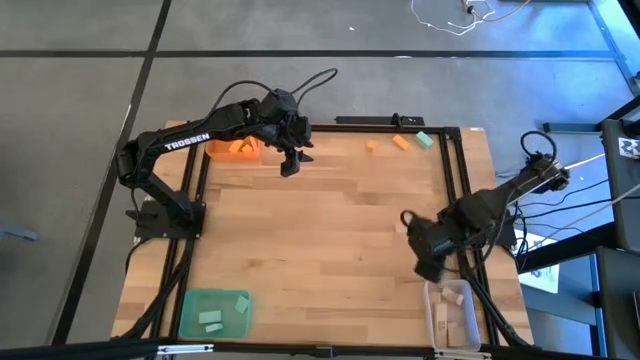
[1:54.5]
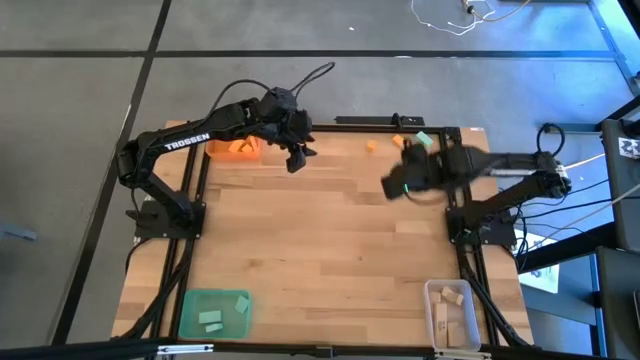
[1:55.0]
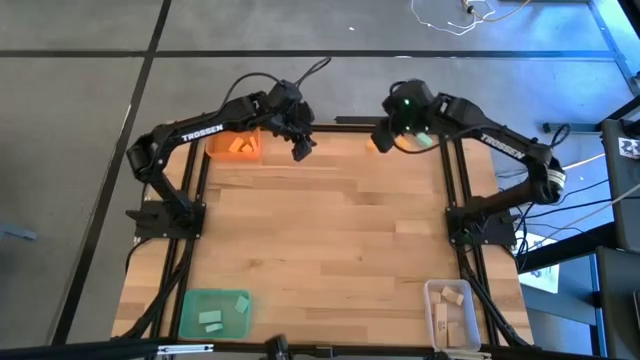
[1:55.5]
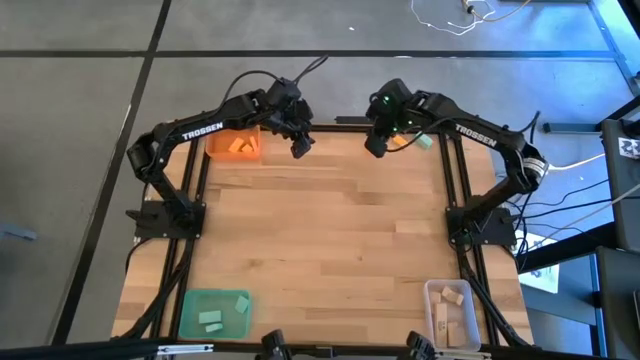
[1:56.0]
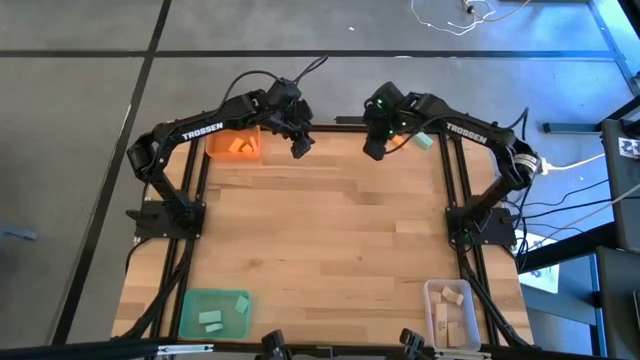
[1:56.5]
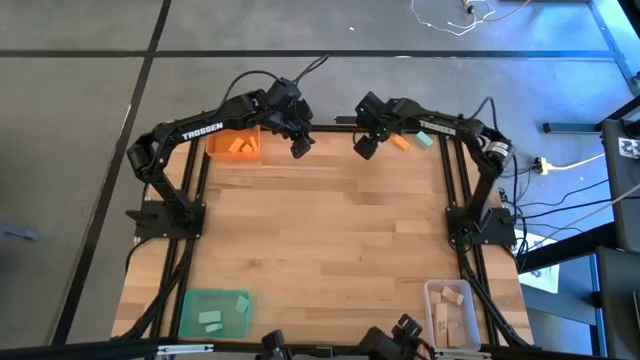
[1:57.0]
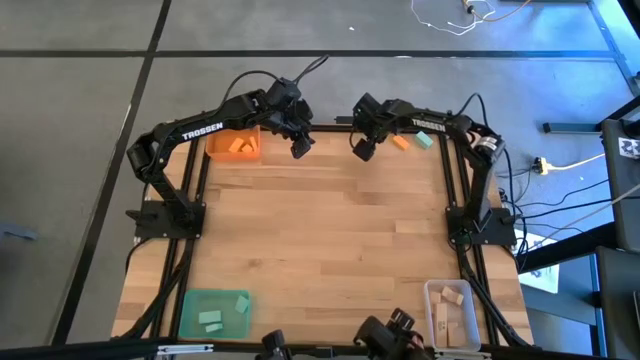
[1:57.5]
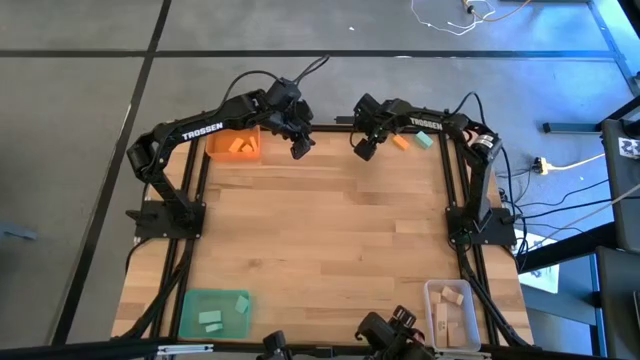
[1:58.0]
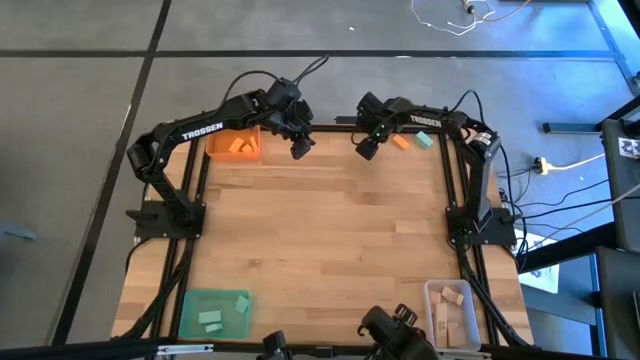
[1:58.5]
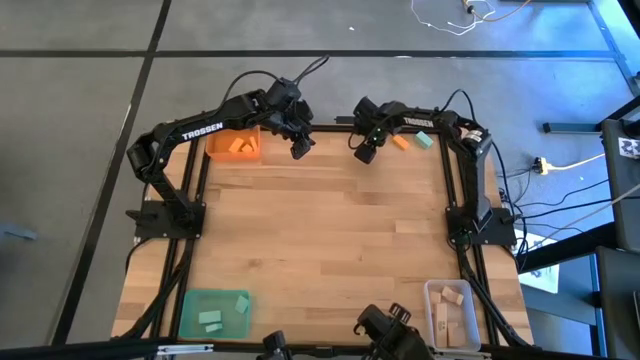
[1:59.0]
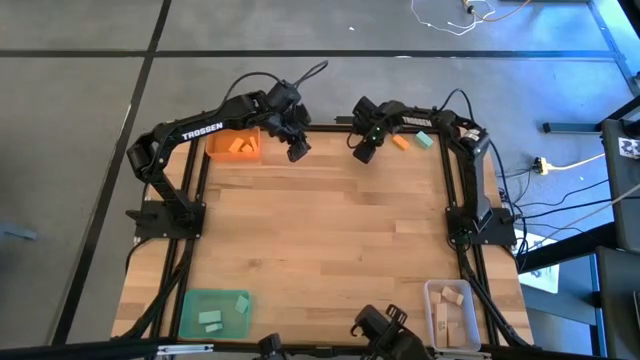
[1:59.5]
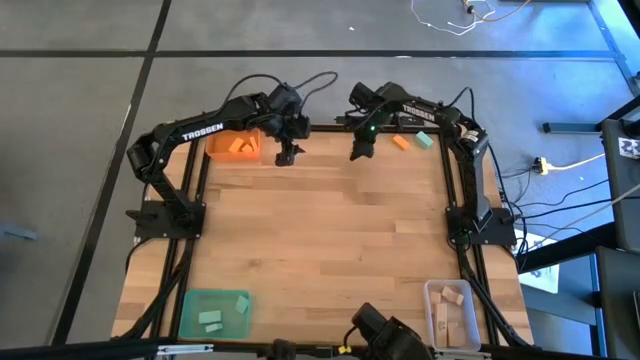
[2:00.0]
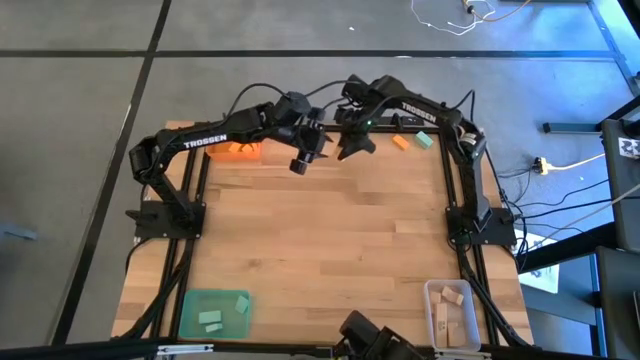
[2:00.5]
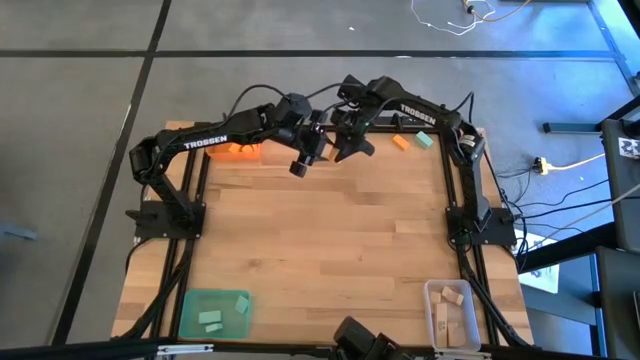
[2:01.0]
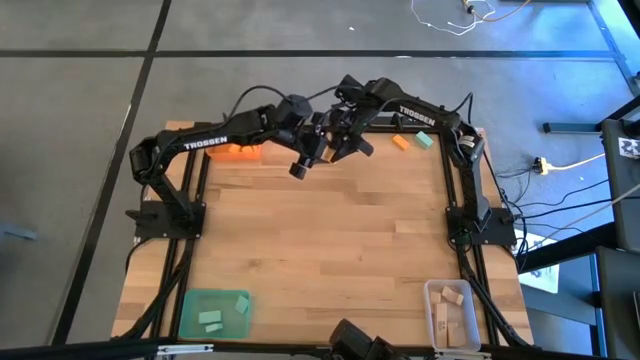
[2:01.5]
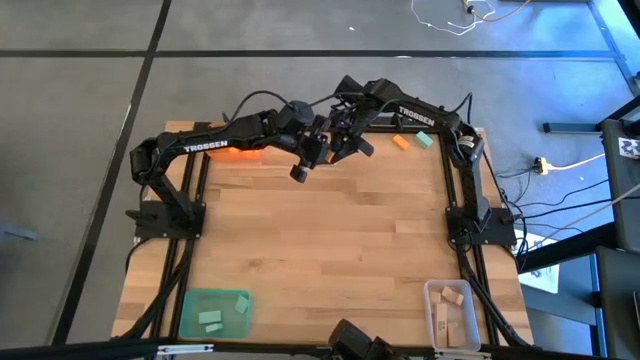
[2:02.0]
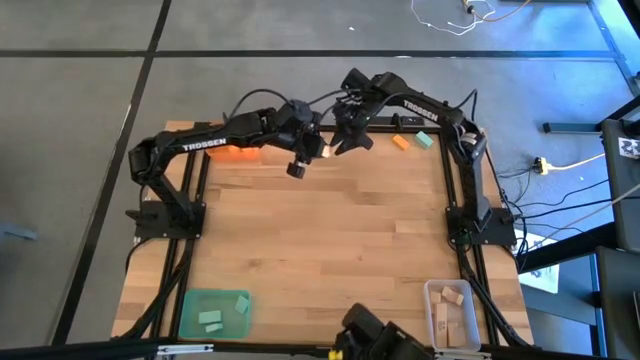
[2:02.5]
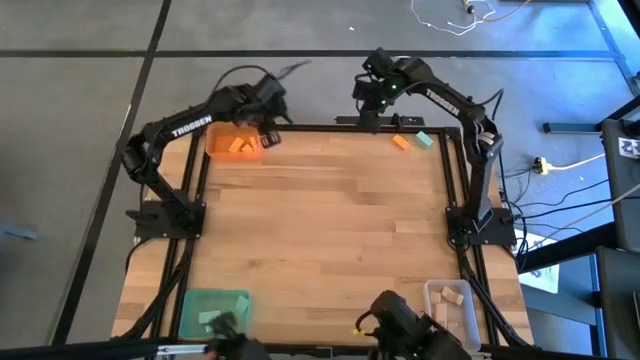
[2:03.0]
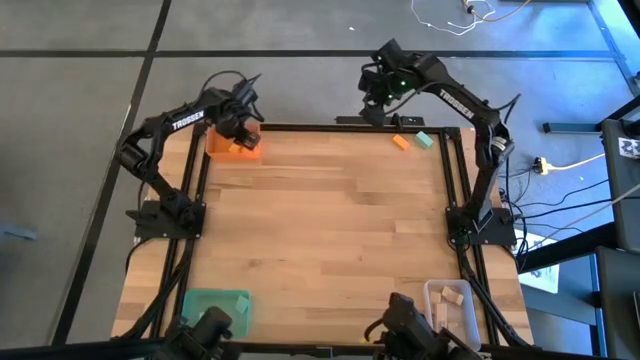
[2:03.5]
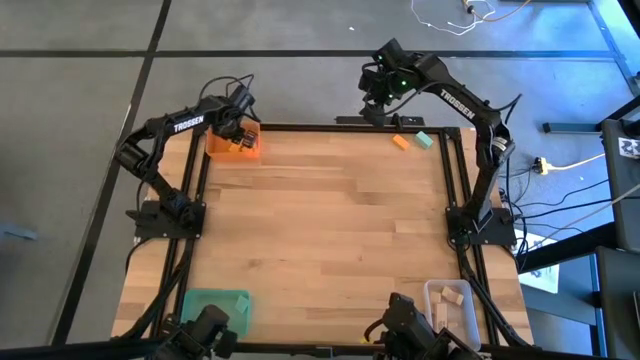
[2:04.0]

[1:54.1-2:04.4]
Task: Sort & place blocks by color
Put the orange block into the orange bin

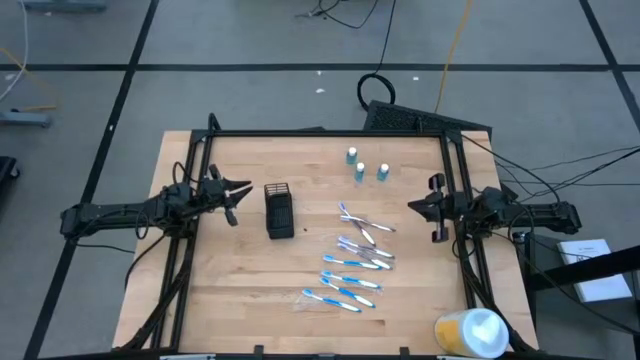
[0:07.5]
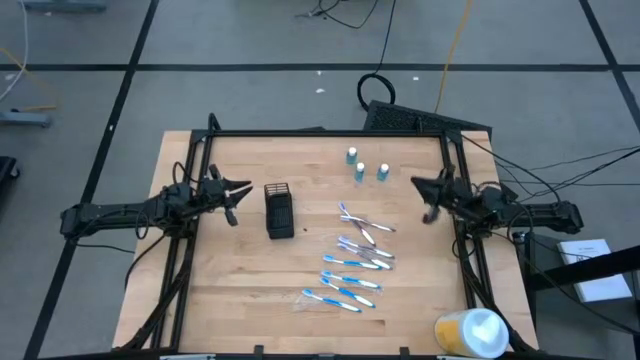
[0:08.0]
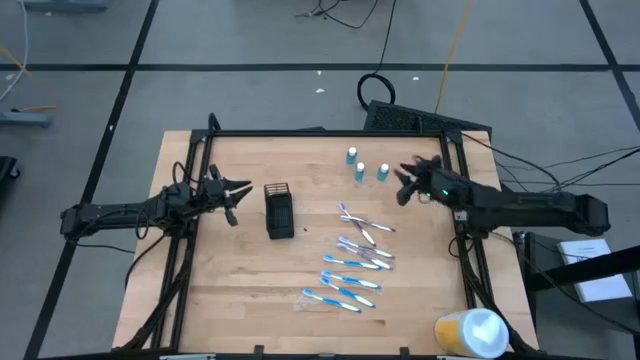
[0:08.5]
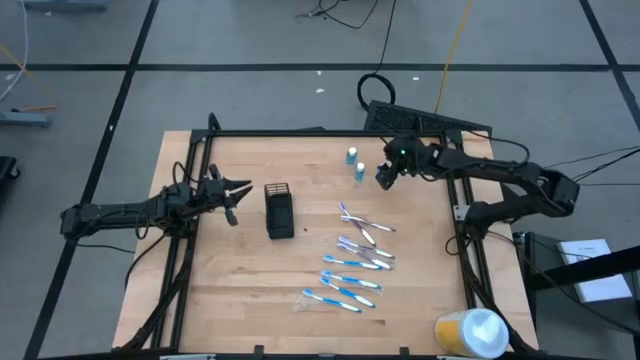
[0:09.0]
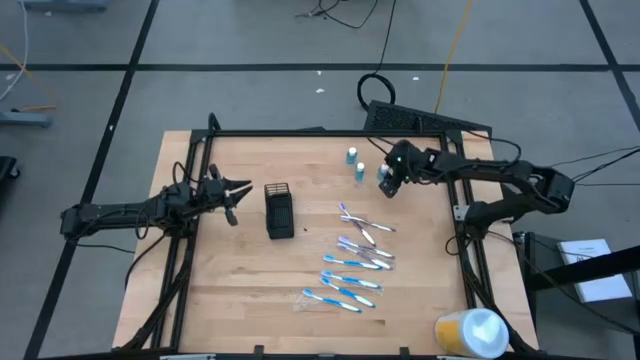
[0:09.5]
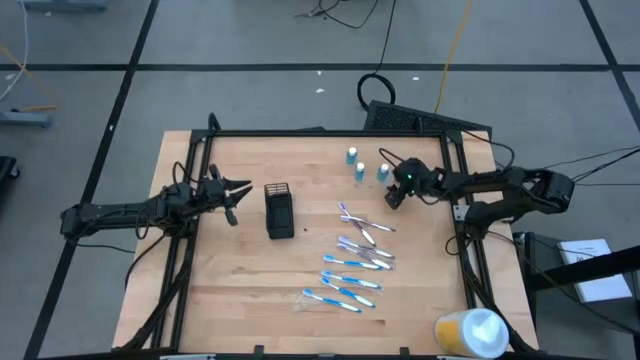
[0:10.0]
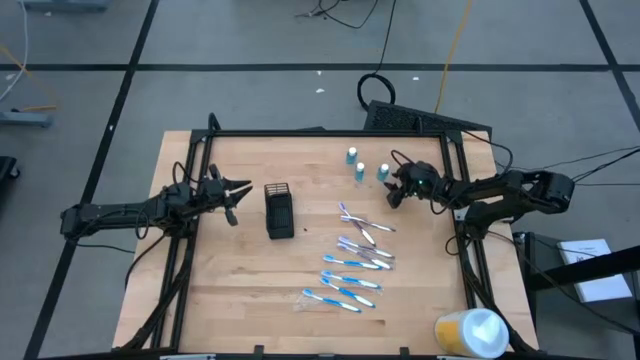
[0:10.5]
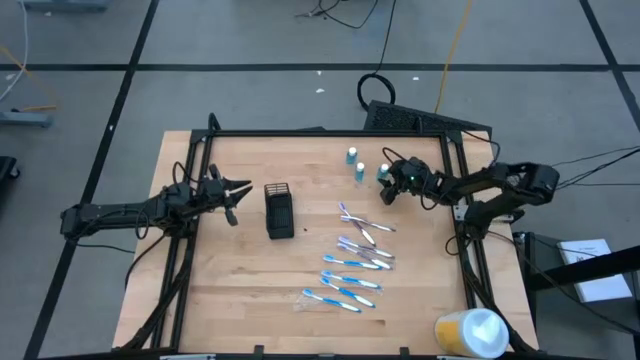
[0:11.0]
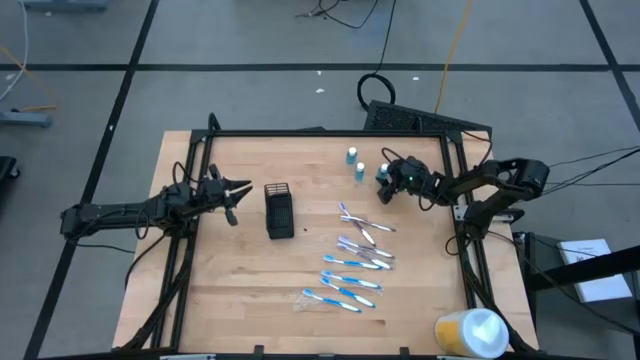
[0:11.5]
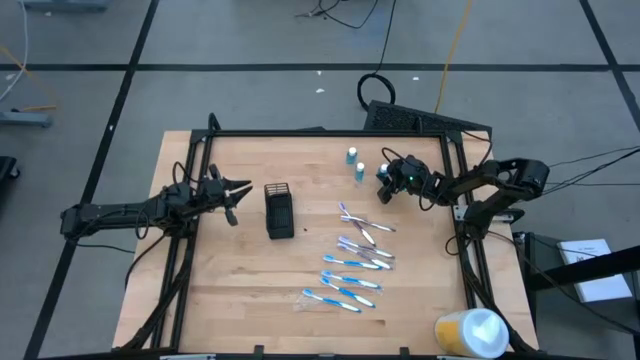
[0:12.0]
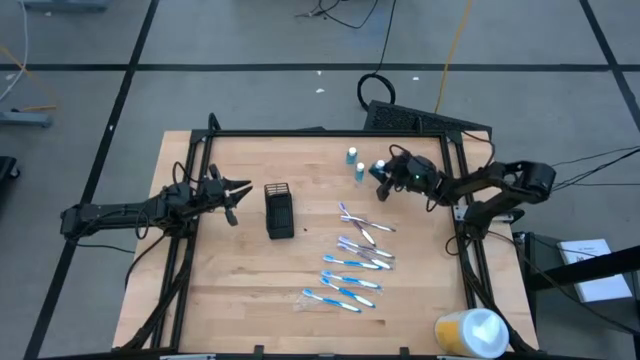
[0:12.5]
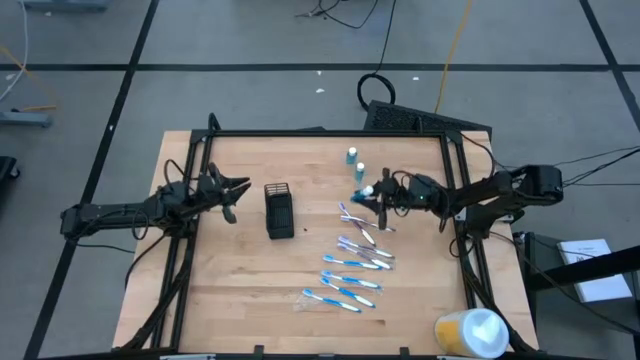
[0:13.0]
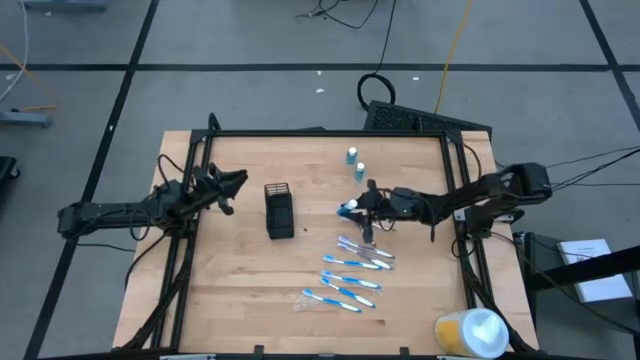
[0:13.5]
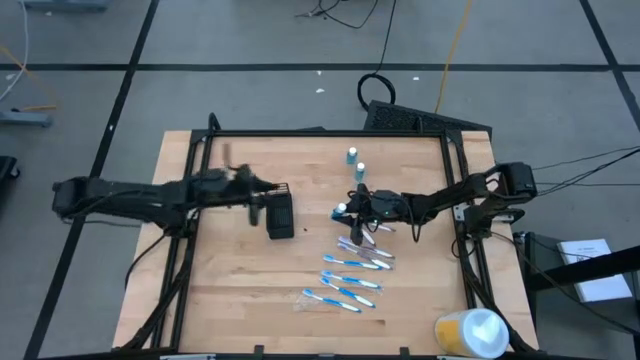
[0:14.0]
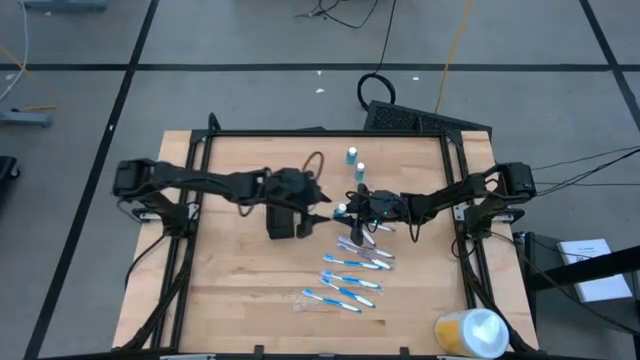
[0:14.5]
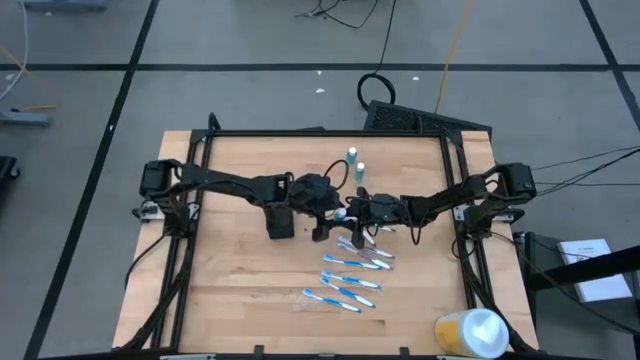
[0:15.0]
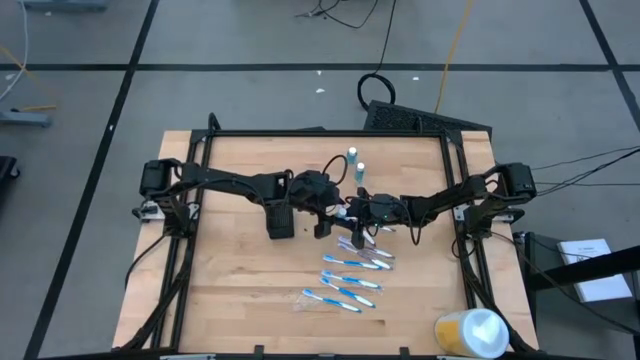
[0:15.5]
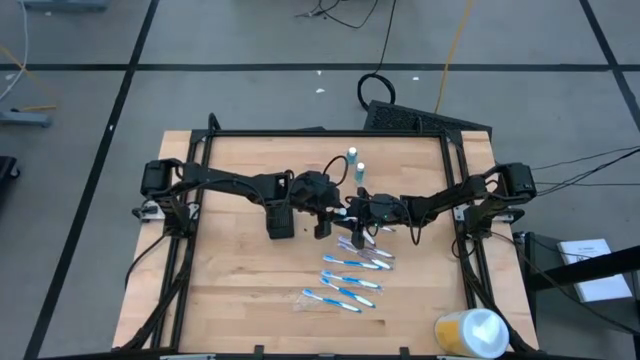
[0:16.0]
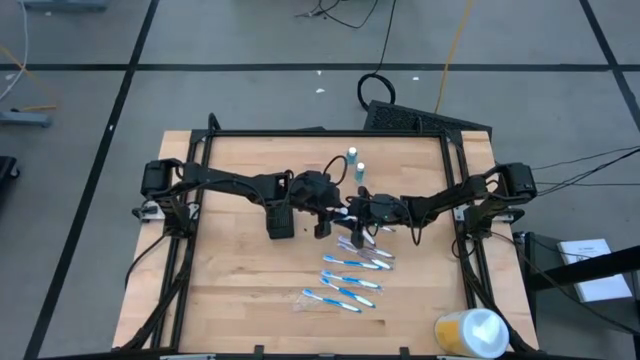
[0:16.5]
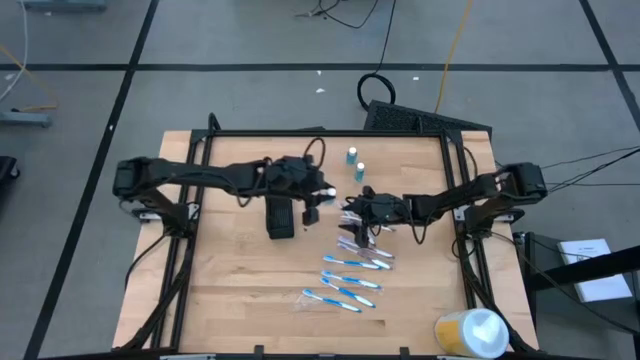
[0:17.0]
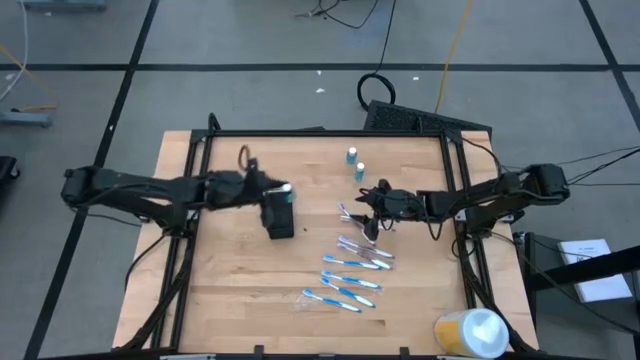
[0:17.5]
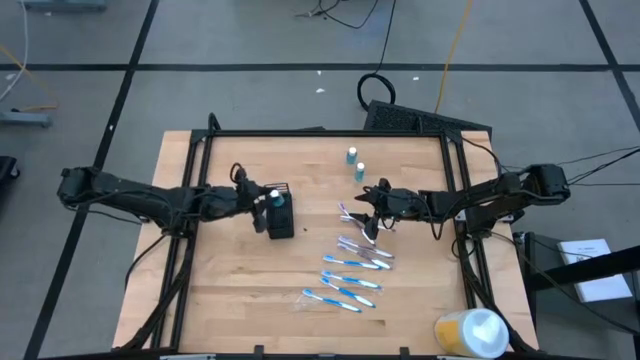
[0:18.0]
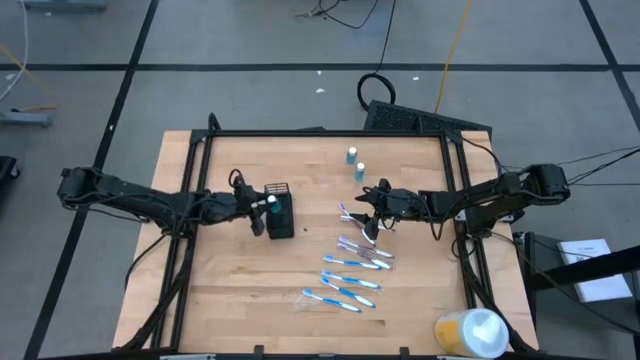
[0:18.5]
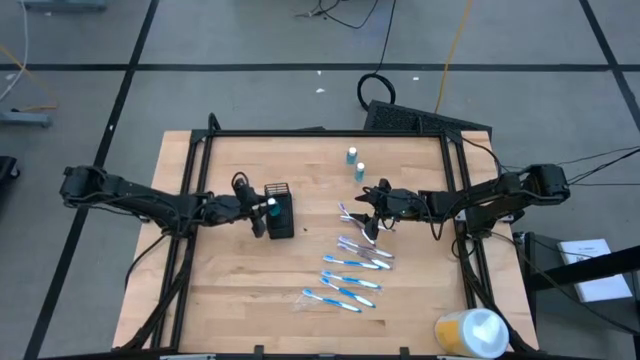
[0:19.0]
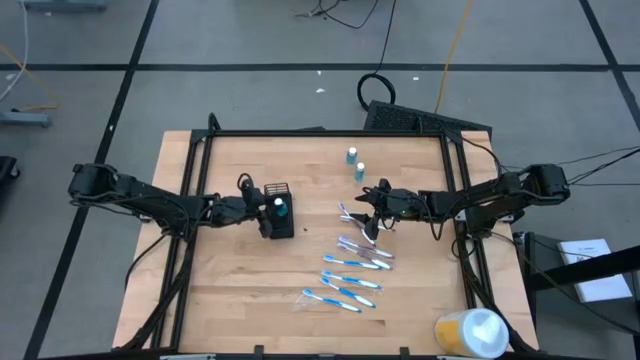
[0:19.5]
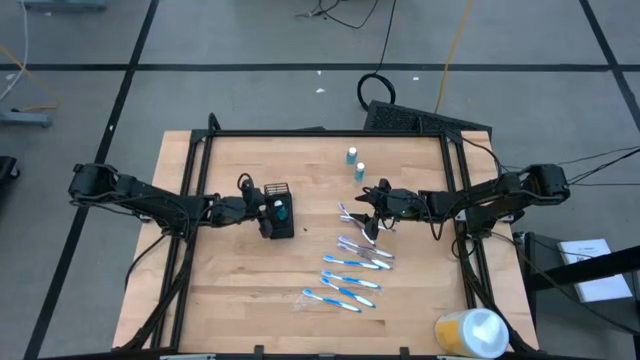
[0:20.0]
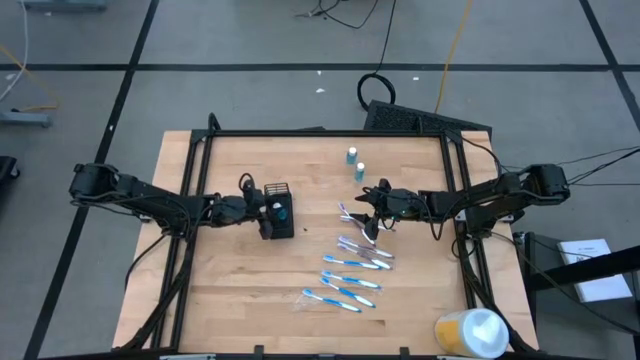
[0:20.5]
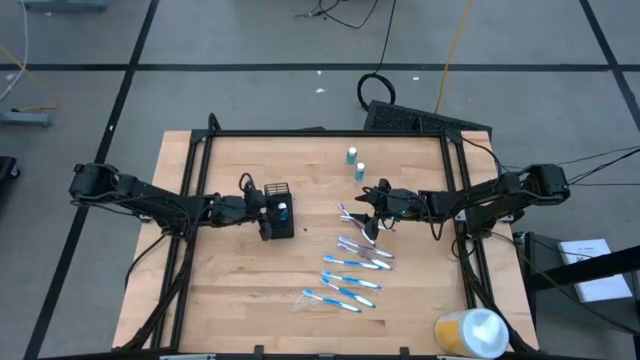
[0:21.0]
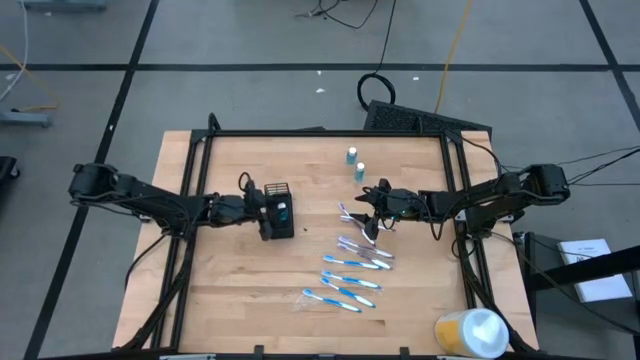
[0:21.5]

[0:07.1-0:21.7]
Task: Pick & Place toothbrushing station
Put the mouthwash into the black organizer
